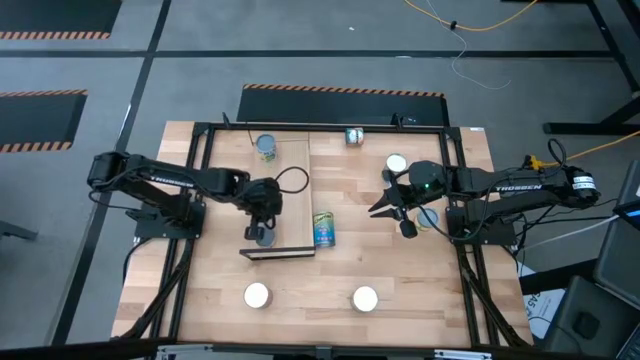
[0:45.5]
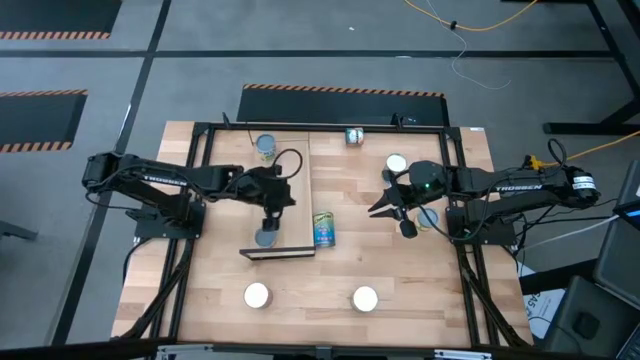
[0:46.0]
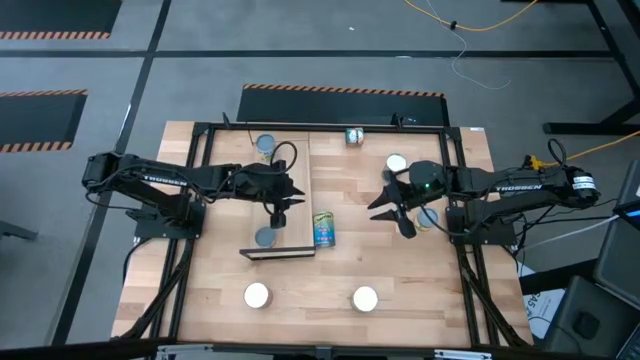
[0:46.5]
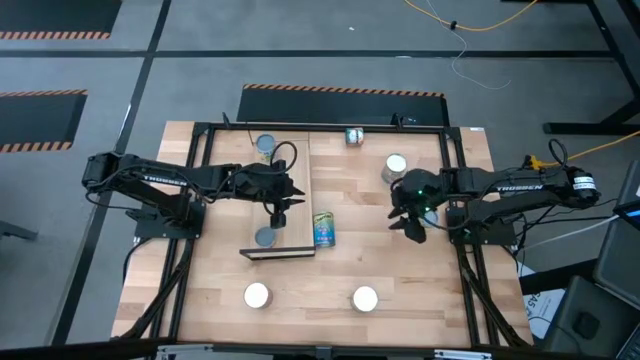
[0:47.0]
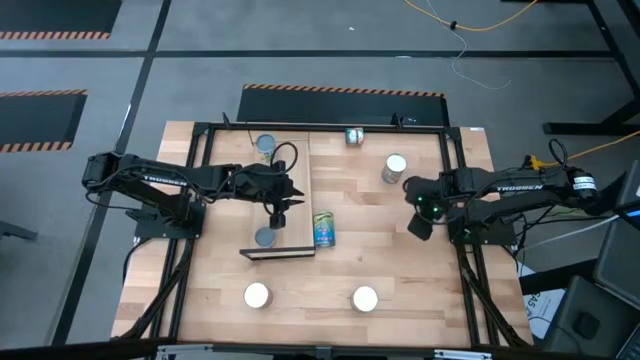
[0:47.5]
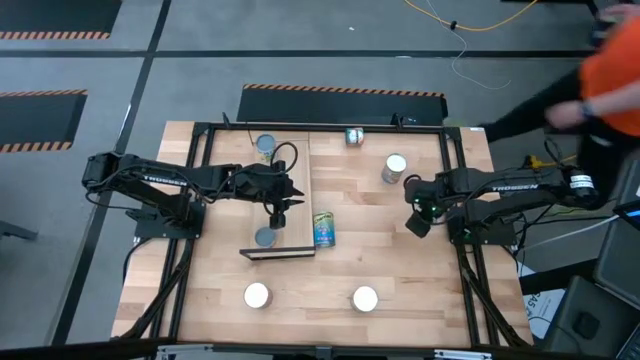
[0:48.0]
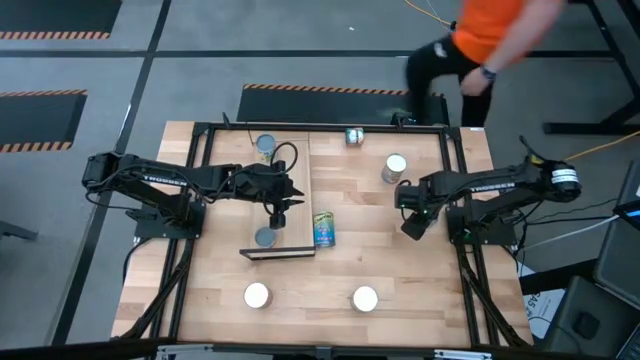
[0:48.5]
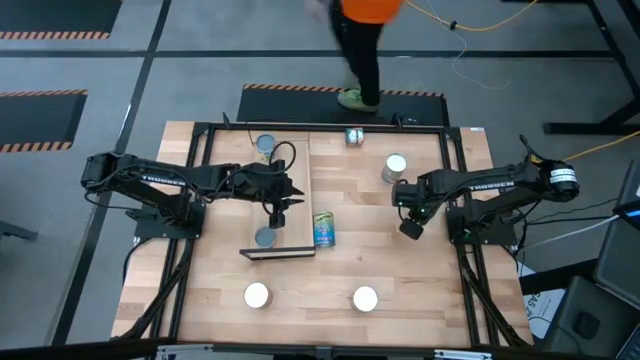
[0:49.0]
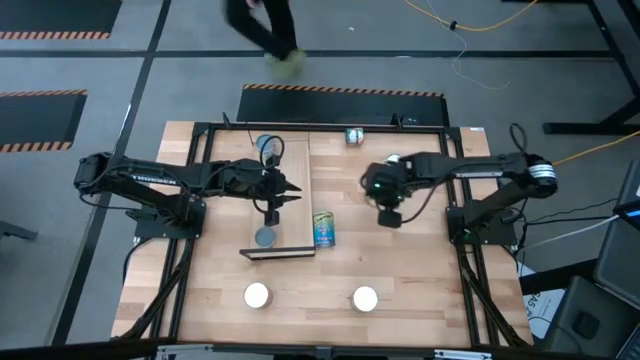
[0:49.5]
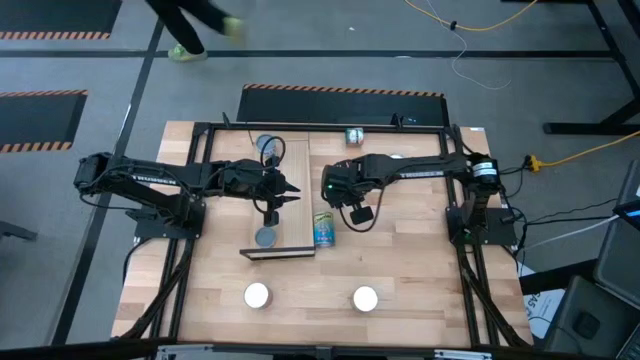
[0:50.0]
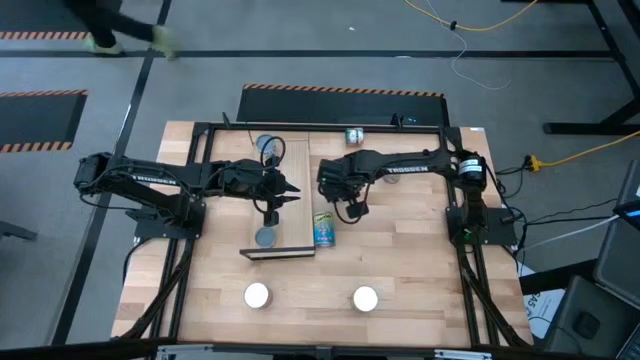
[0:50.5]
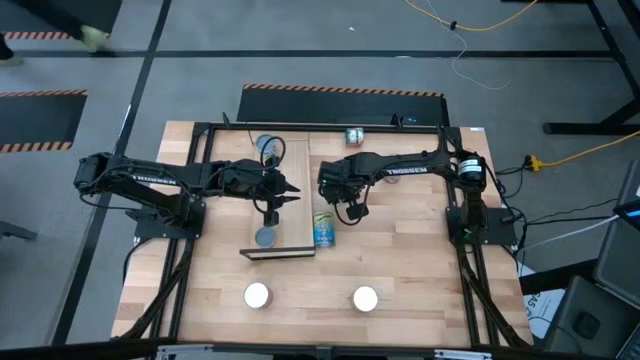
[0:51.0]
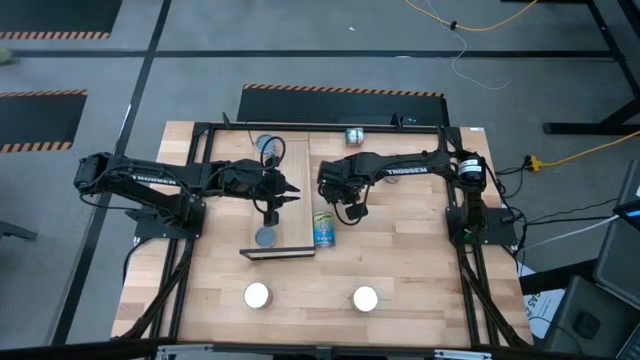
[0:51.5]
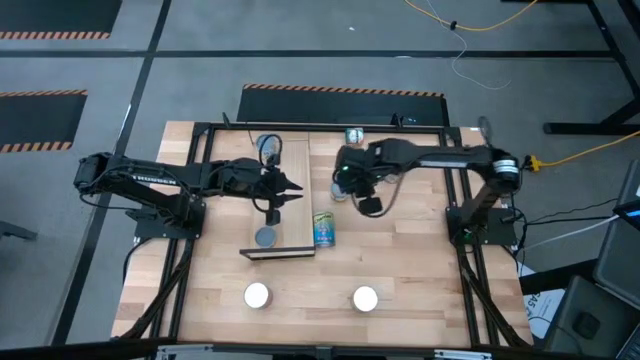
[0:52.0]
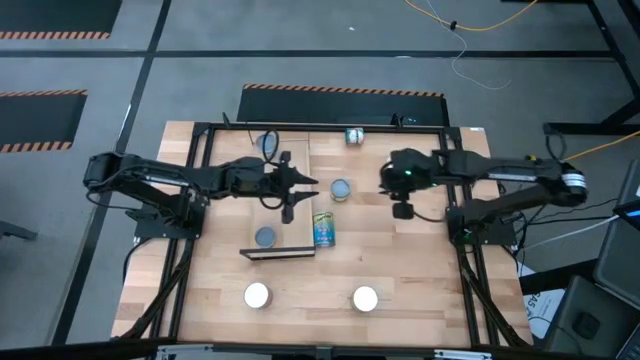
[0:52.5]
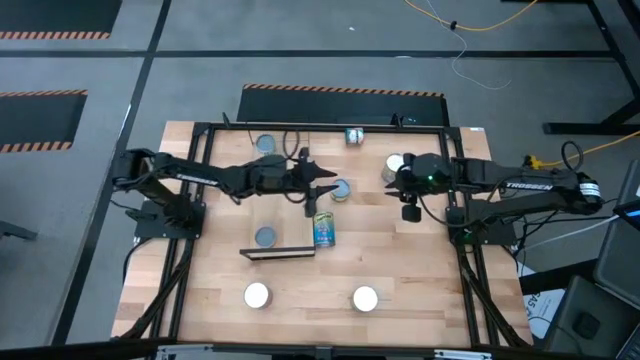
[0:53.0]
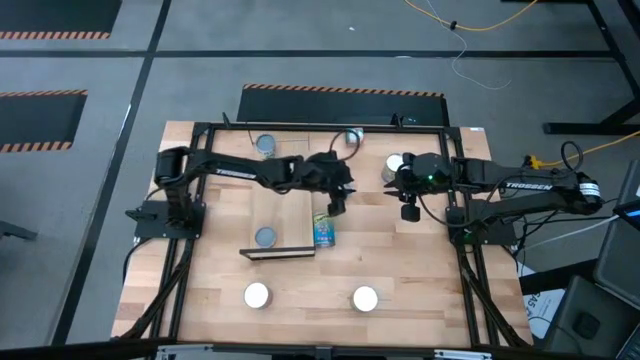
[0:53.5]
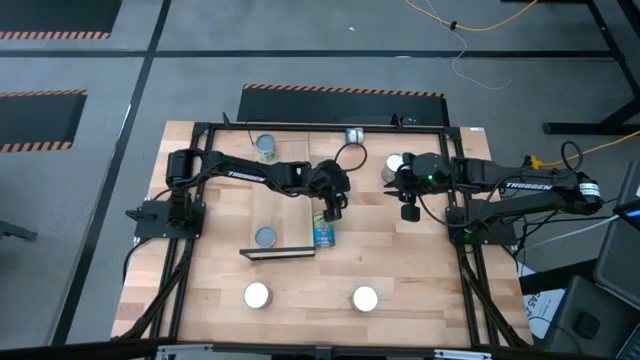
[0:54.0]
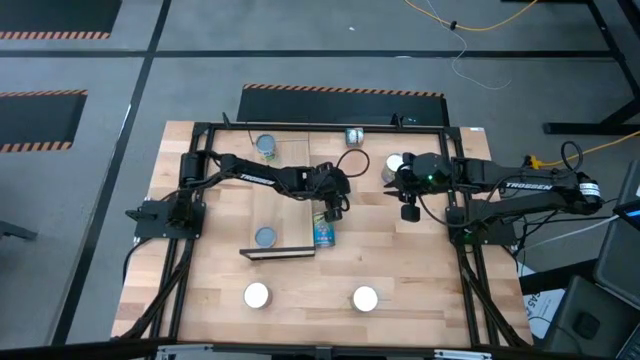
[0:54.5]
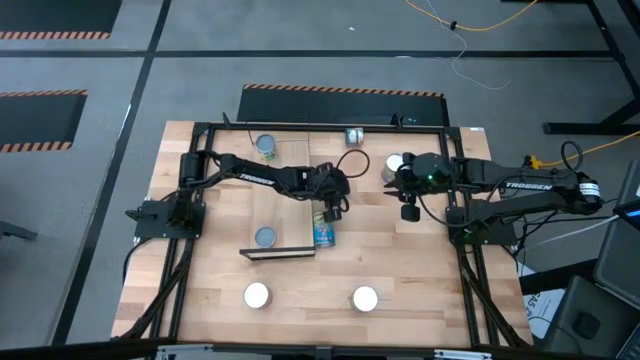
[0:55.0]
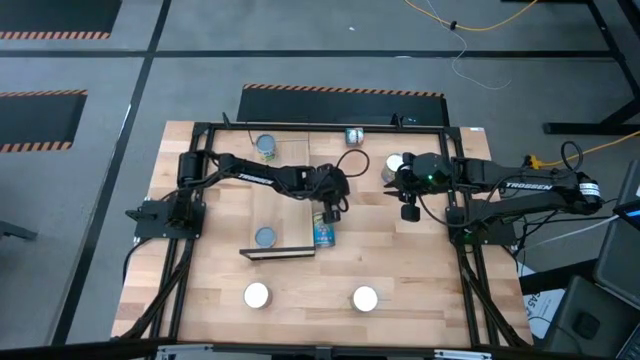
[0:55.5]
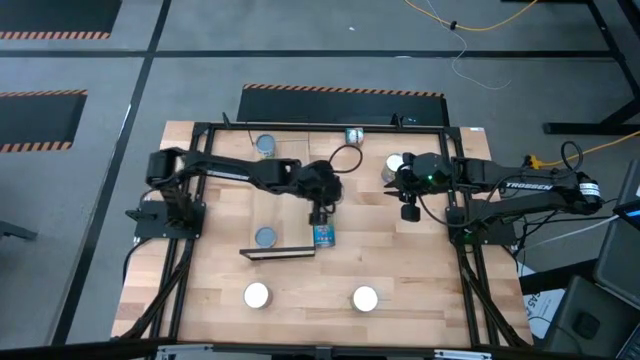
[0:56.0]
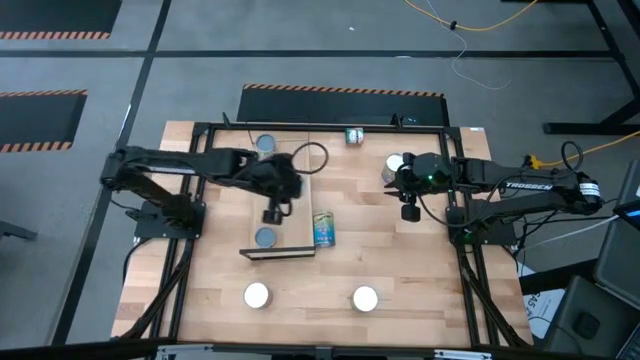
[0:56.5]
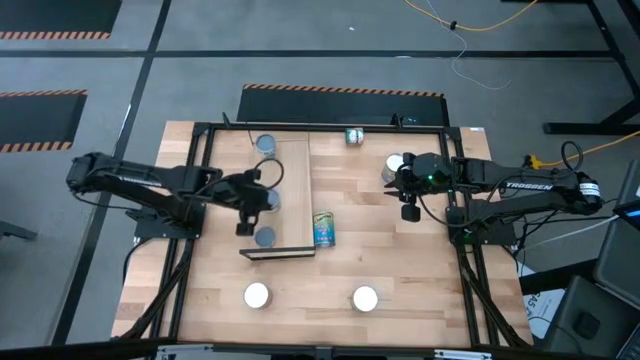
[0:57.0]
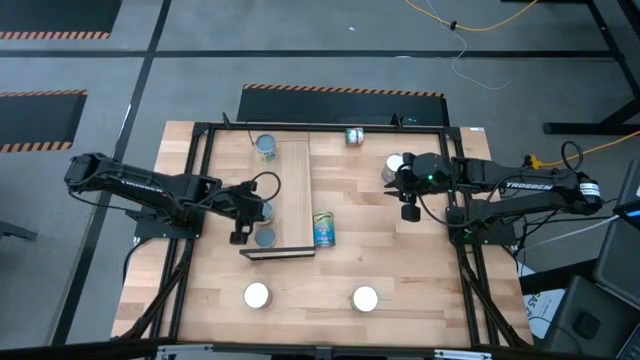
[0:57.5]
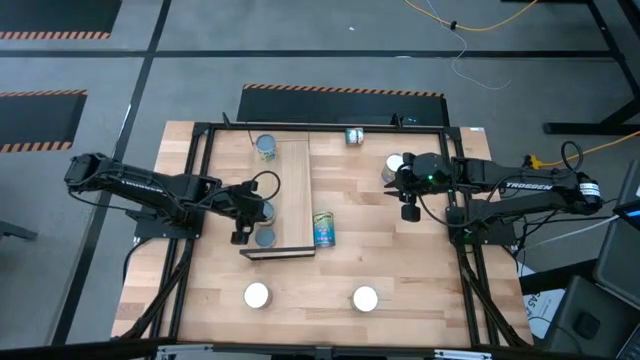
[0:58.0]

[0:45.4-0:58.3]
Task: Pick and place cans onto a shelf
Put the small canned peaches on the shelf

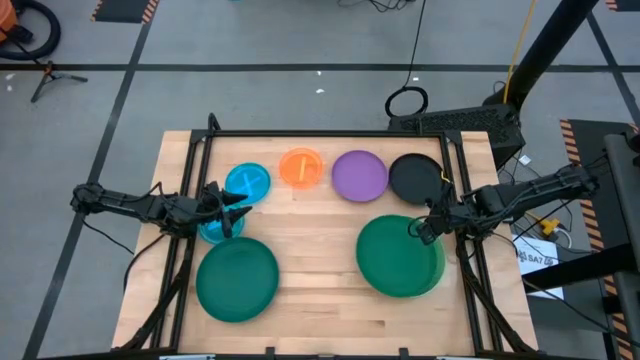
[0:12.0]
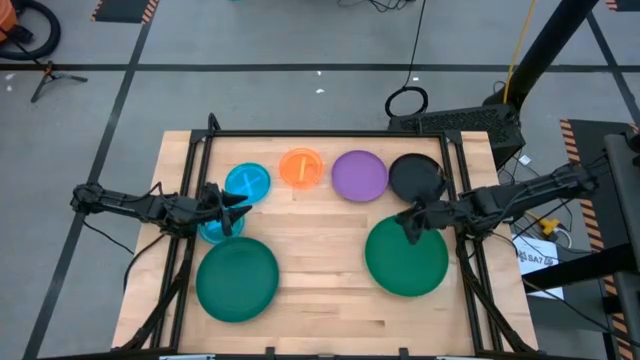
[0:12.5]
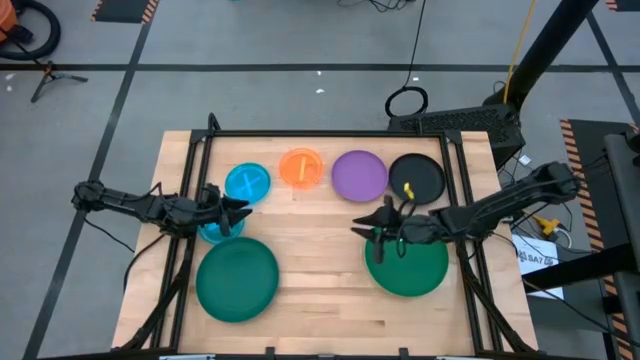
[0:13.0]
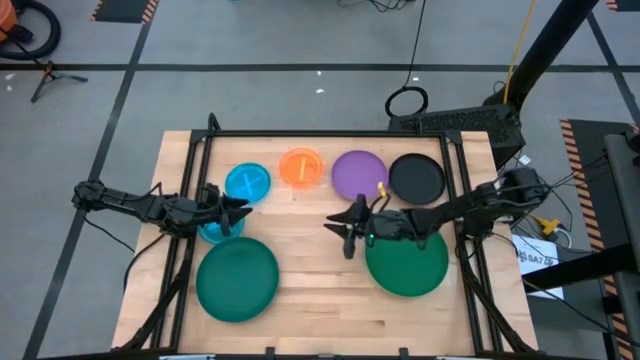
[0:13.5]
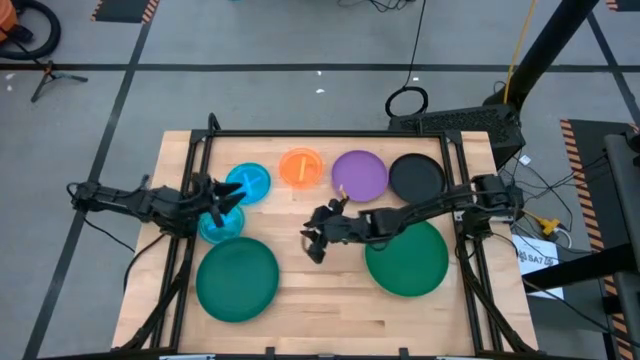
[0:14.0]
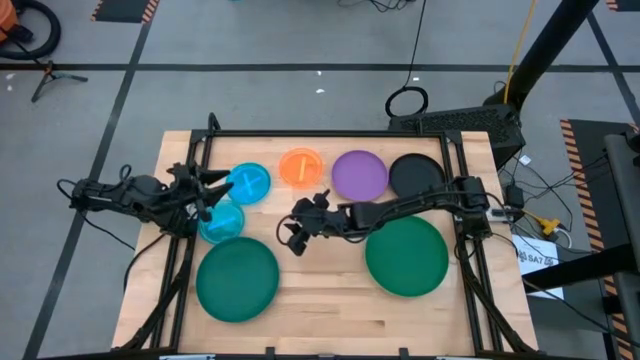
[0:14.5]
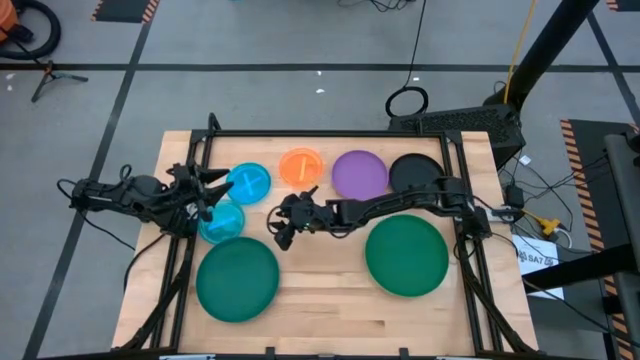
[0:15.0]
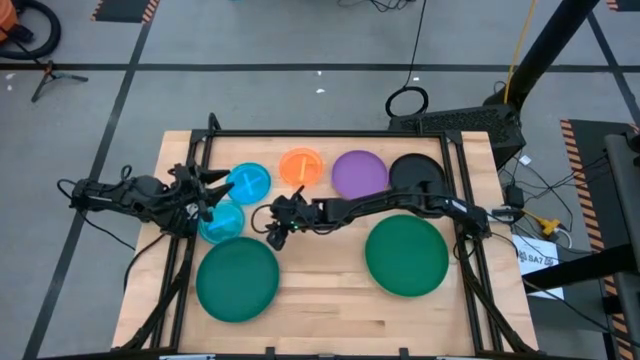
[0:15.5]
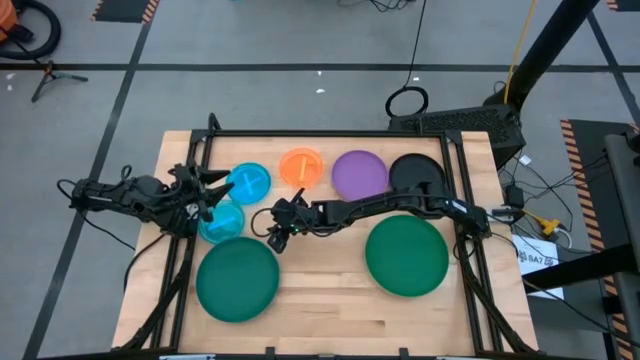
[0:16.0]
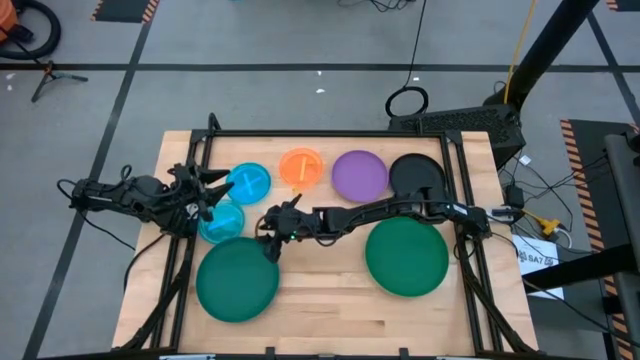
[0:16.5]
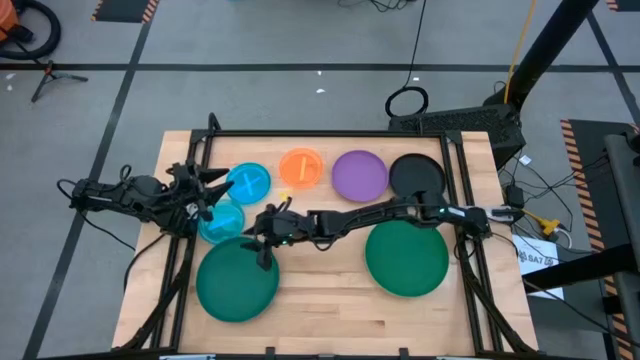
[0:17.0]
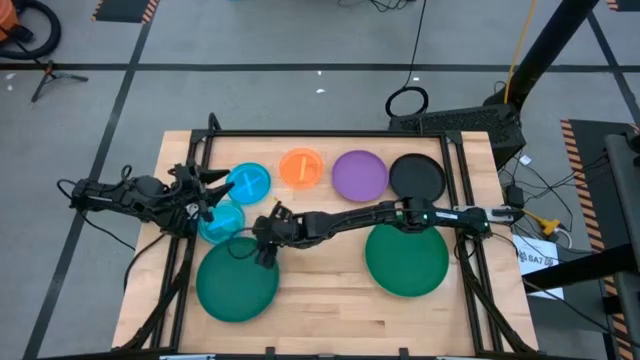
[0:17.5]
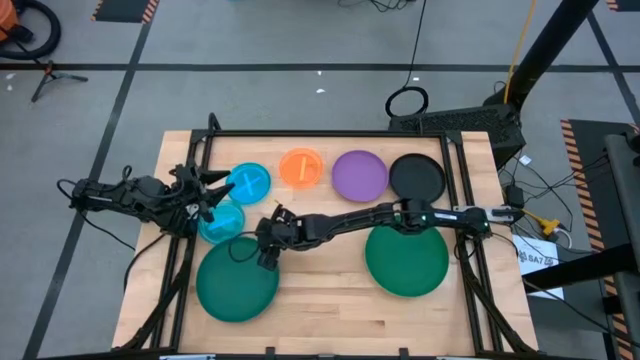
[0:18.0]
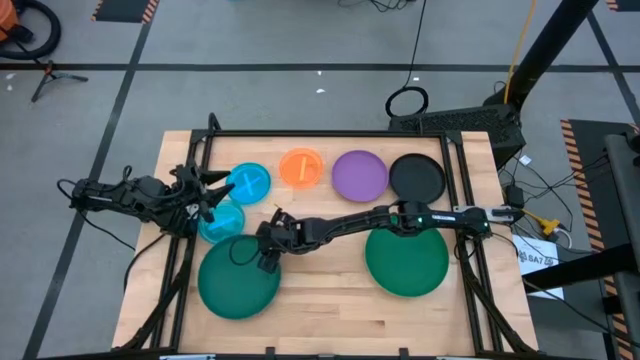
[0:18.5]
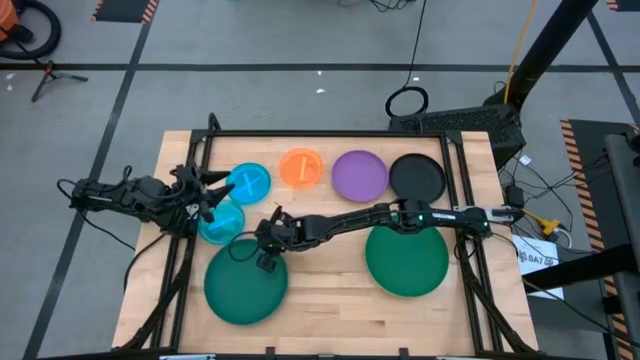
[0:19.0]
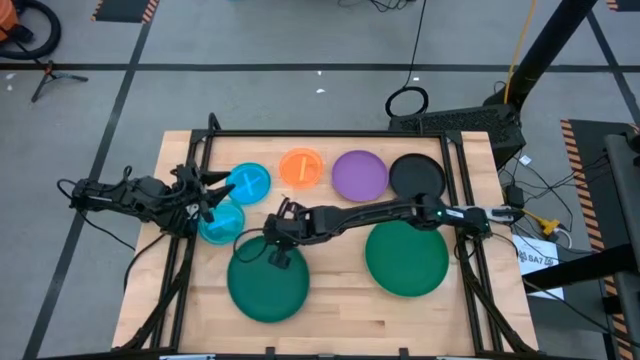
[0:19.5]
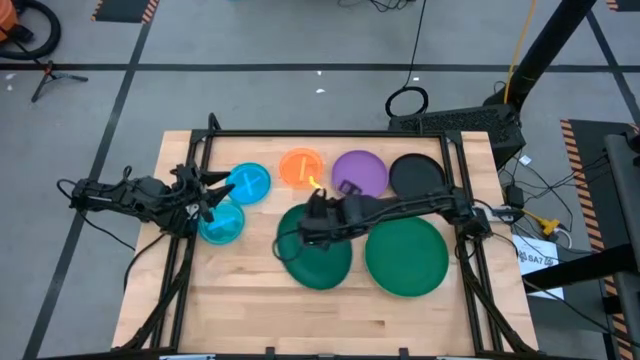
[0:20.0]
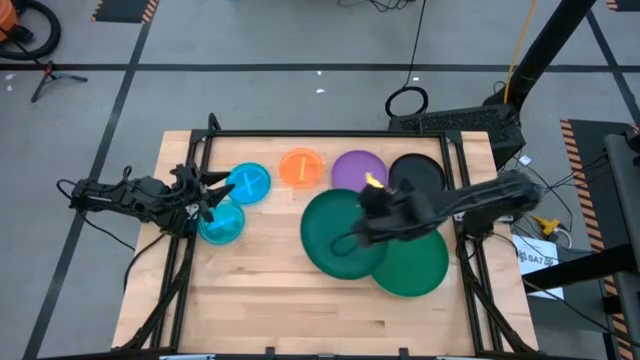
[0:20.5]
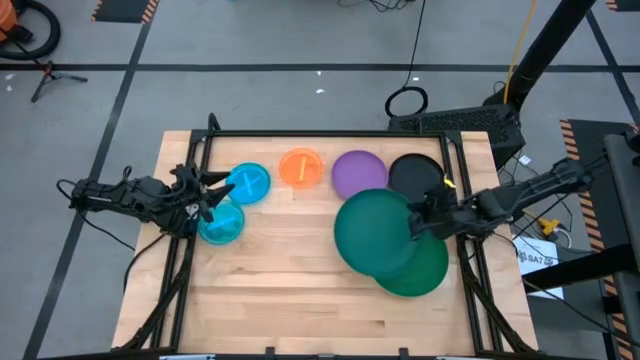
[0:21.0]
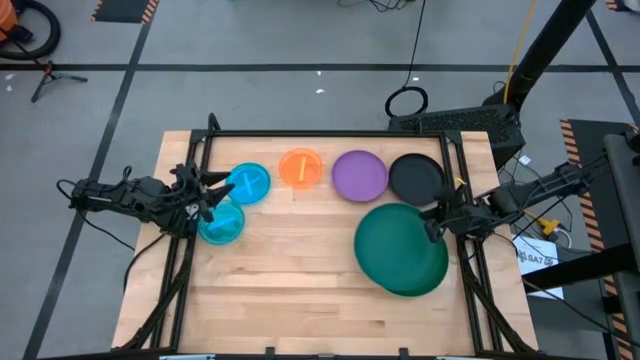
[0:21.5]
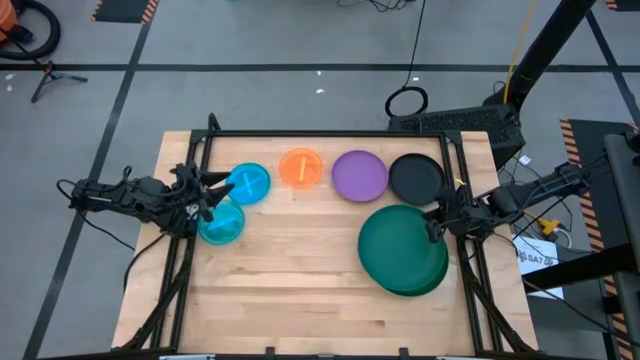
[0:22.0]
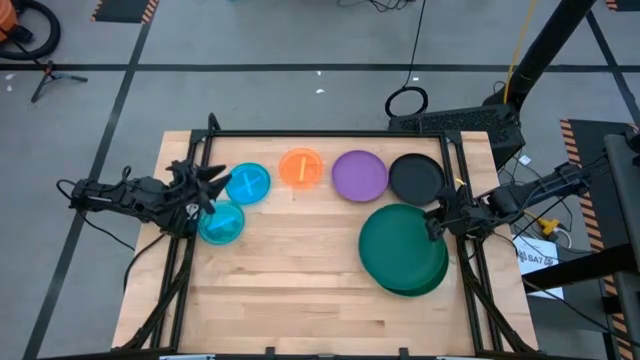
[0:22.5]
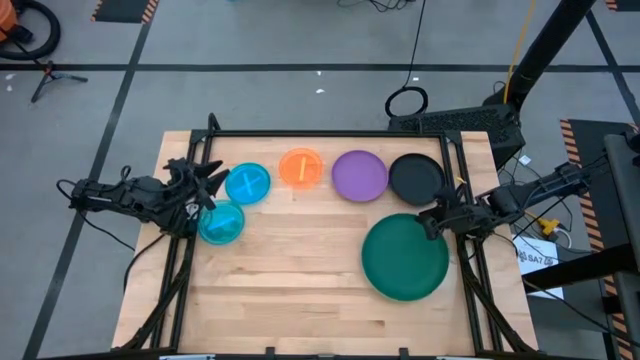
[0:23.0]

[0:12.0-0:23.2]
Task: Stack plastic plates
Stack the dark green plate on top of the other dark green plate
